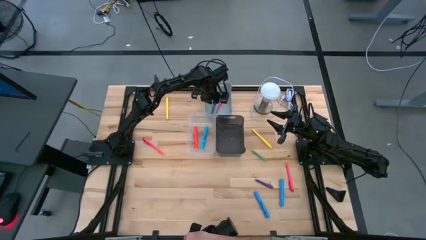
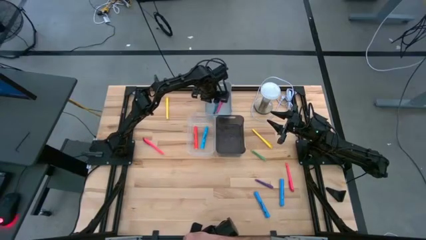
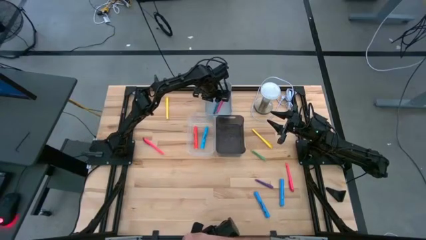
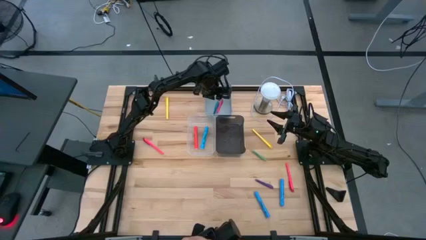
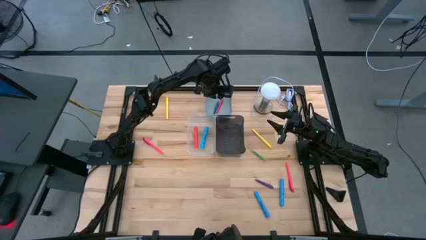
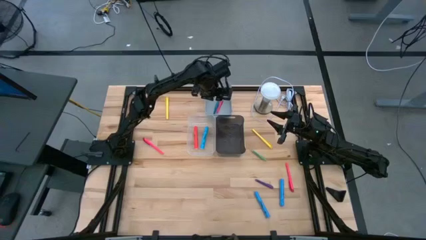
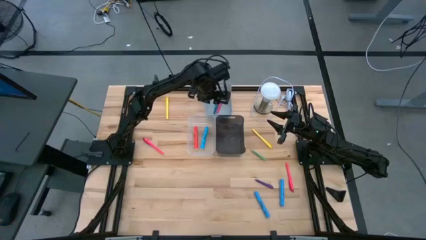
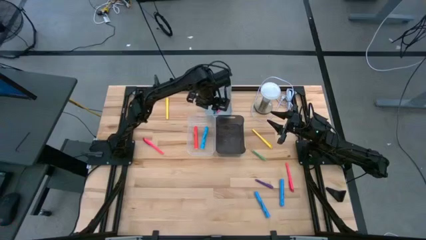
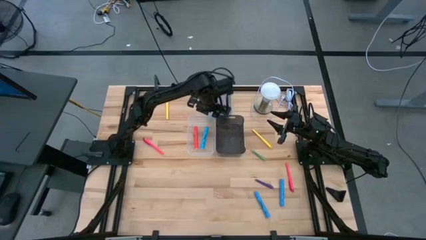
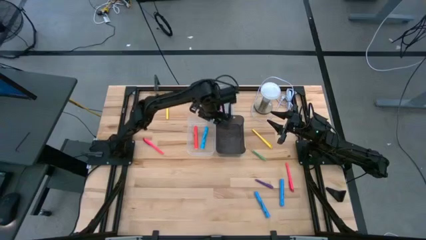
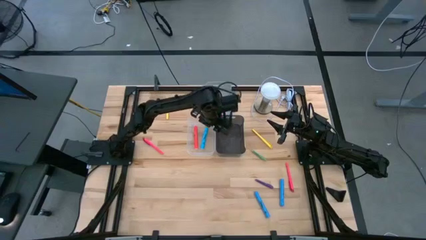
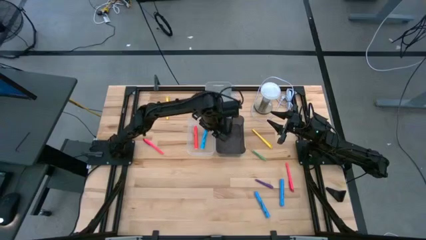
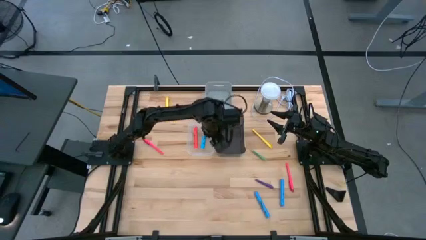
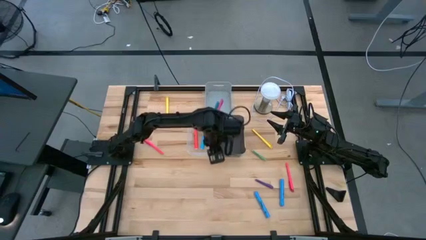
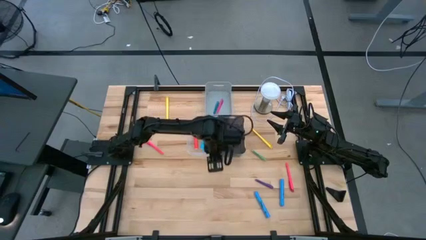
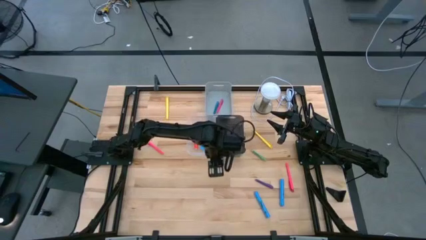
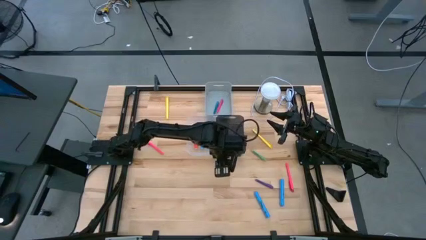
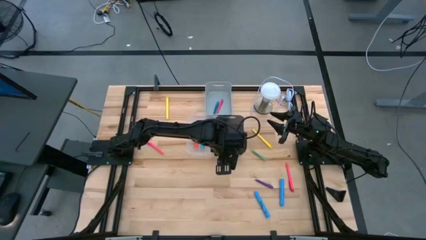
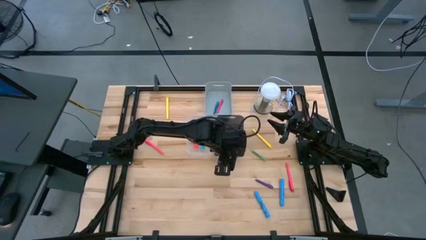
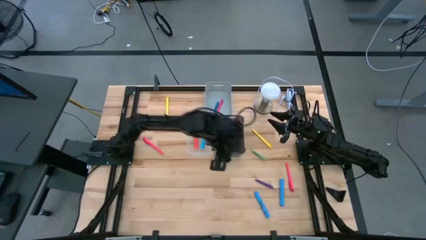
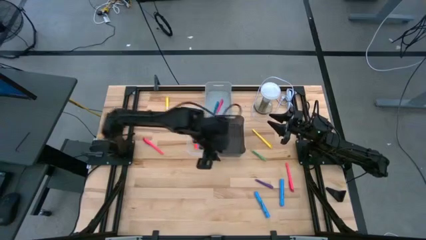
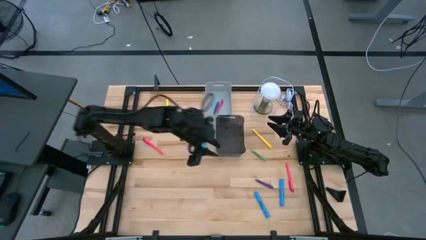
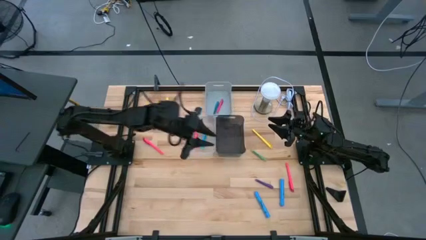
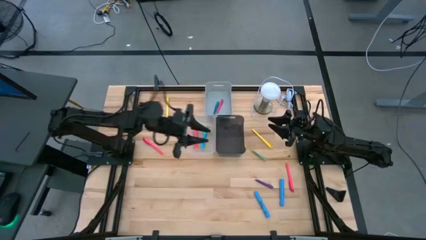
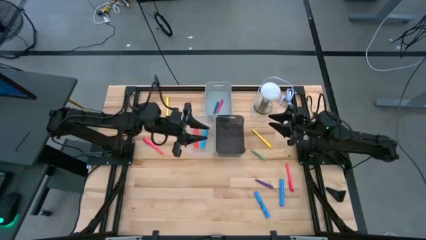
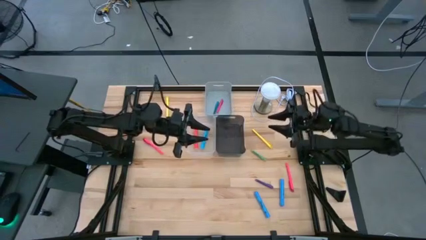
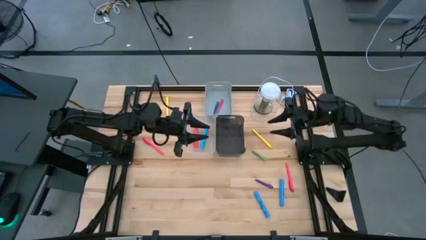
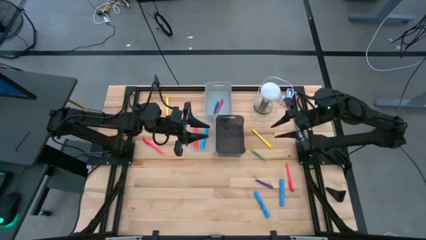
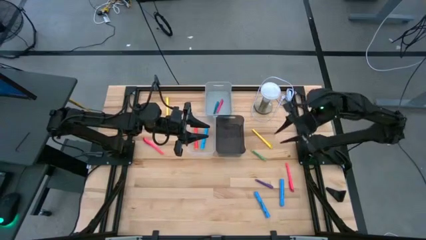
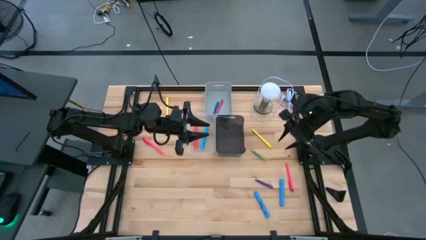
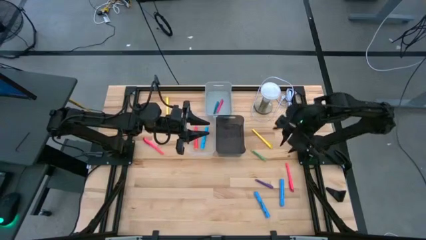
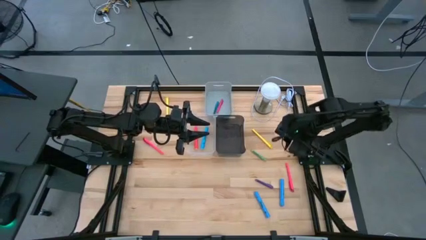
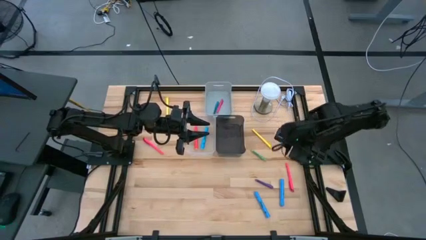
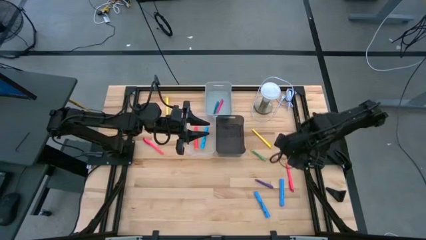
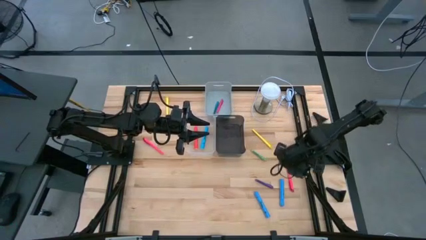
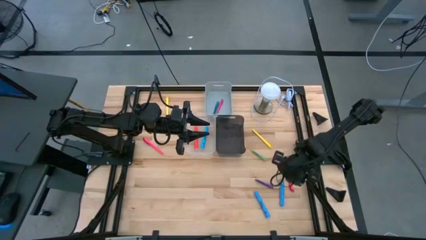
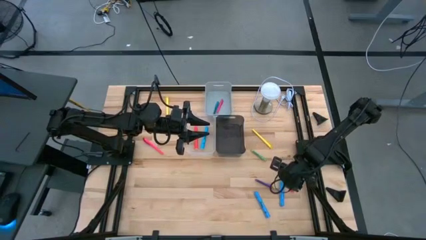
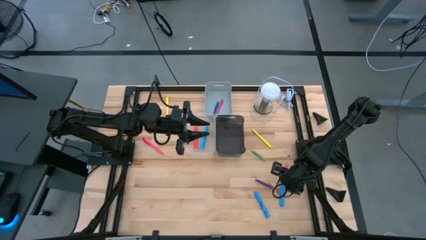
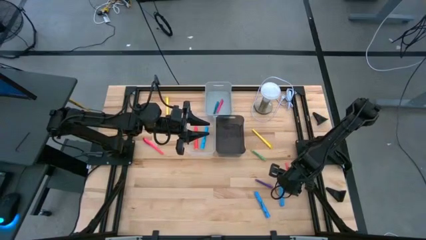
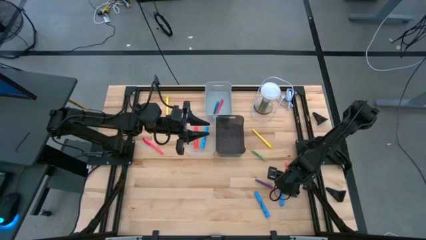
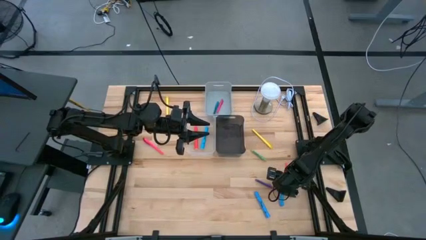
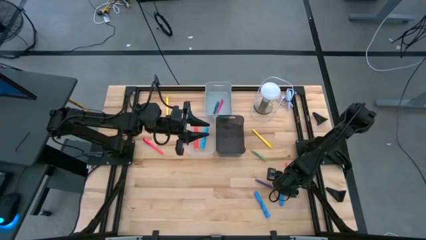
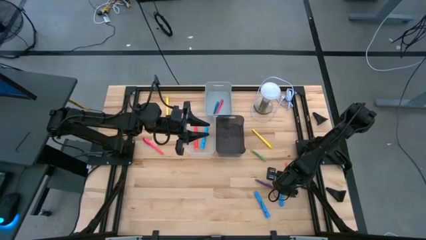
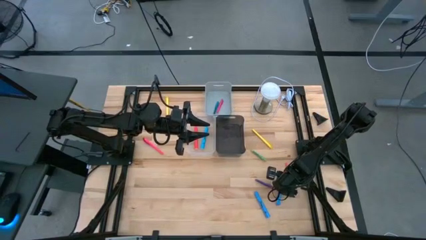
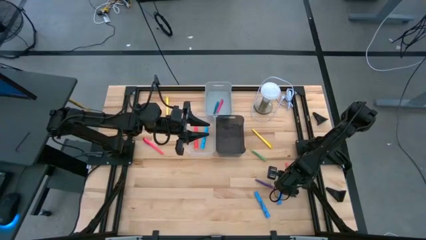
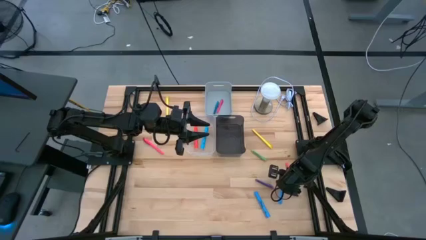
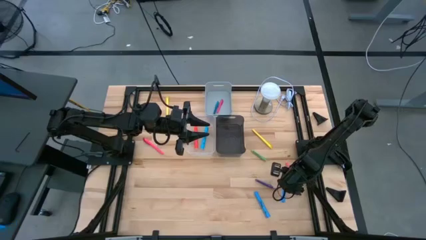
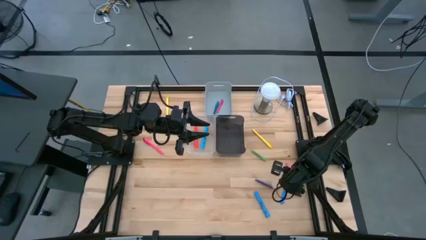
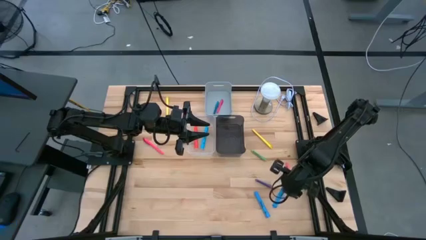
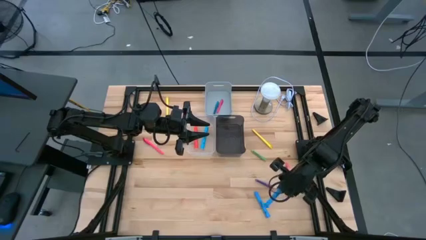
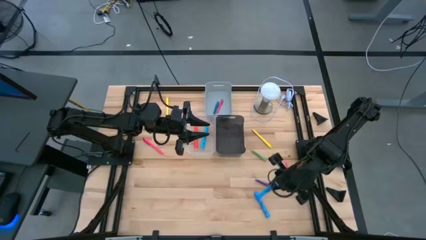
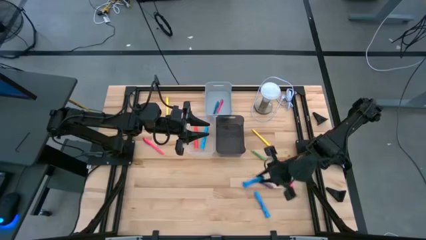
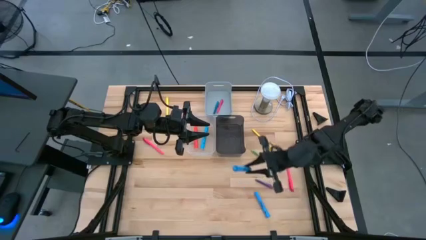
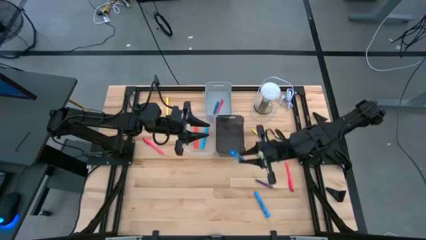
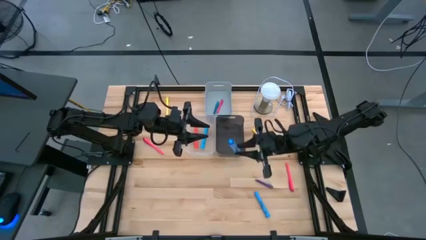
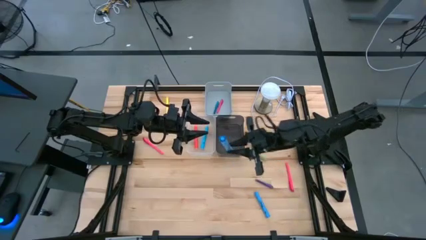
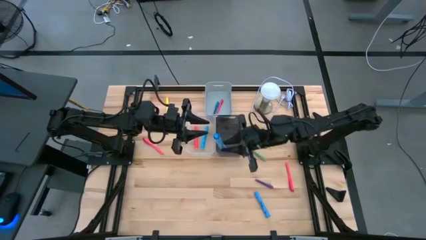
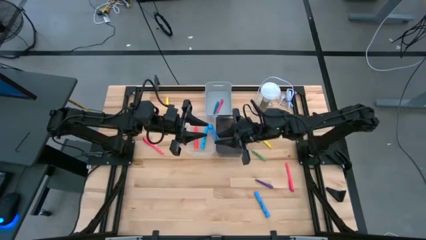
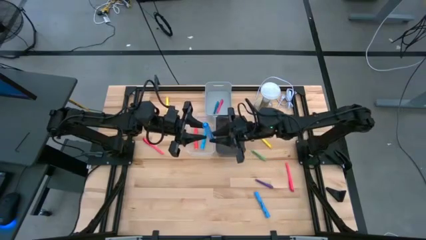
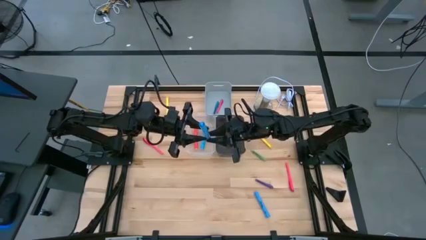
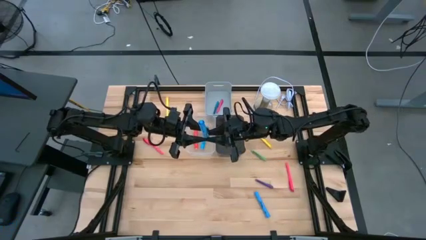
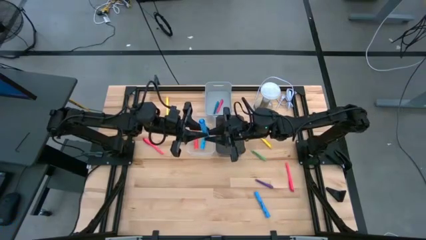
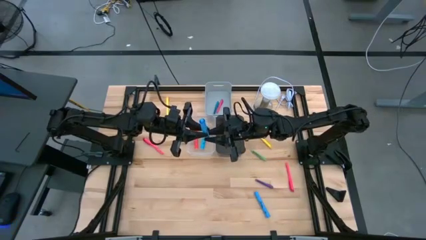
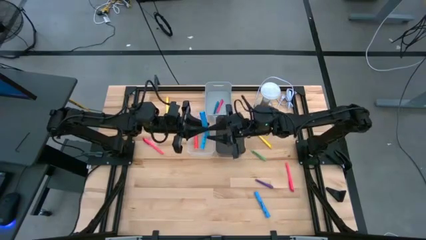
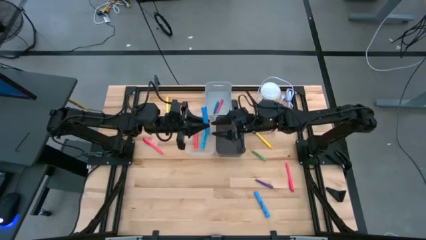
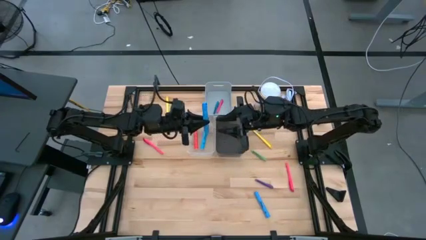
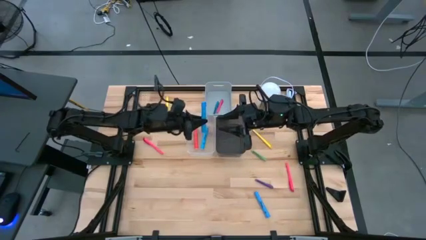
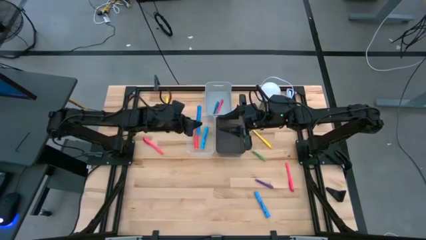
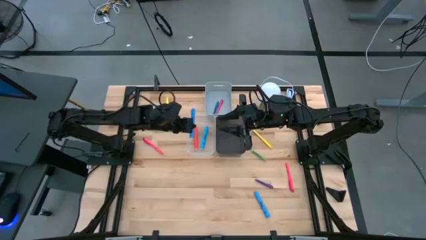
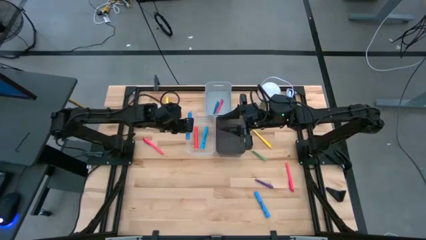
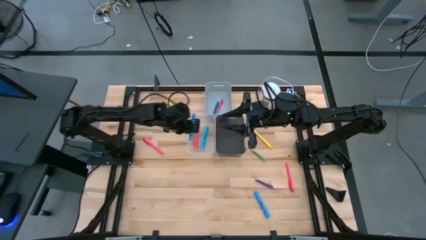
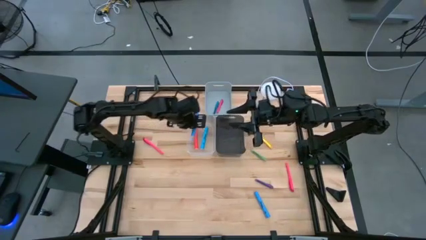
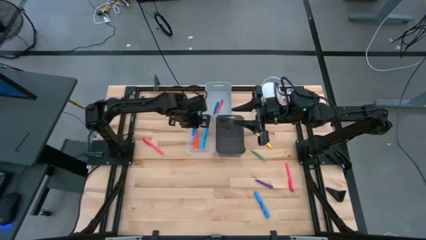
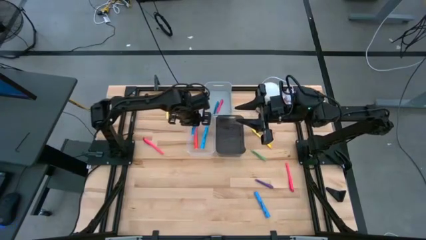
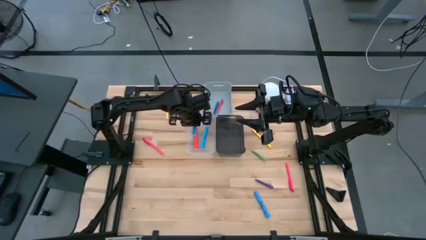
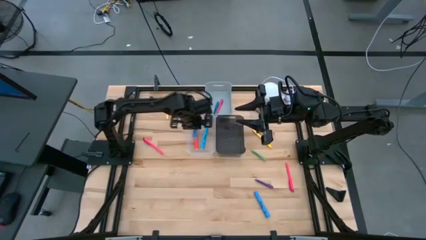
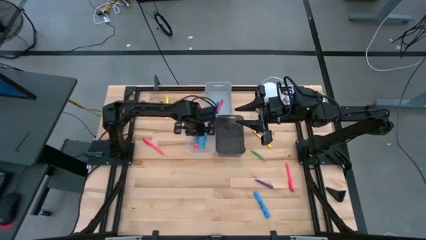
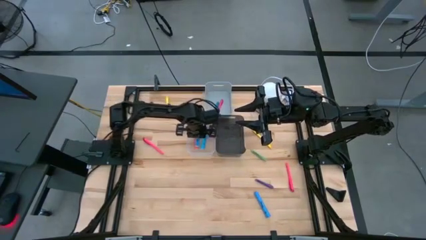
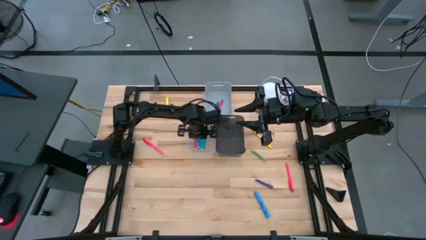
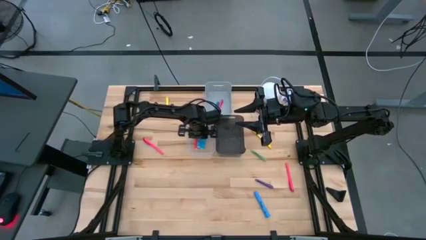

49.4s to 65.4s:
Task: Pick & Place Markers
Put the right blue highlighter into the transparent bin
